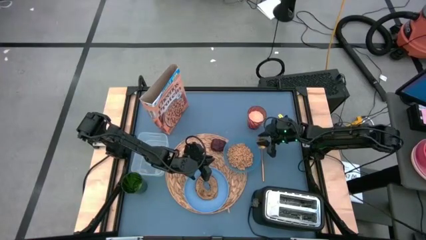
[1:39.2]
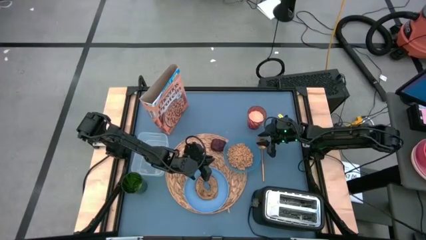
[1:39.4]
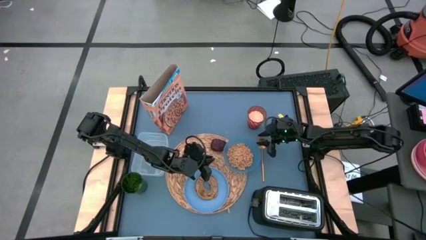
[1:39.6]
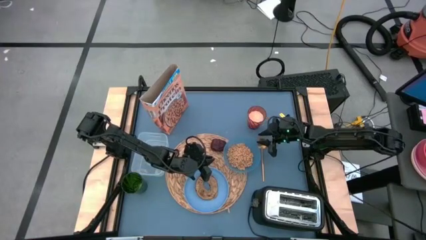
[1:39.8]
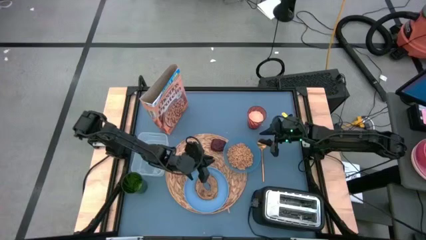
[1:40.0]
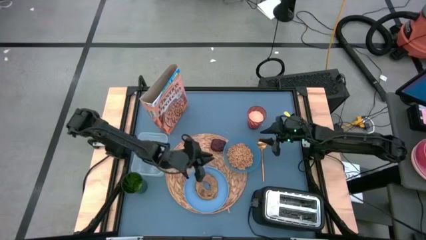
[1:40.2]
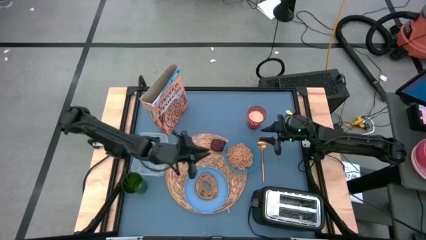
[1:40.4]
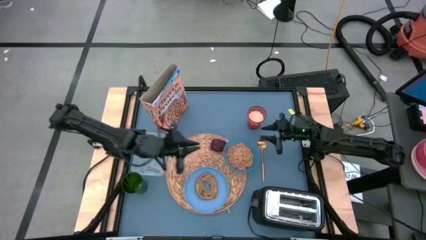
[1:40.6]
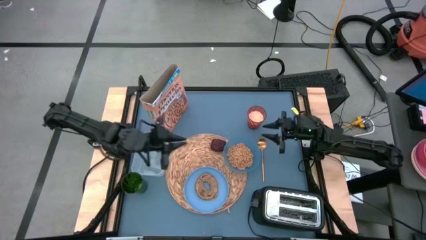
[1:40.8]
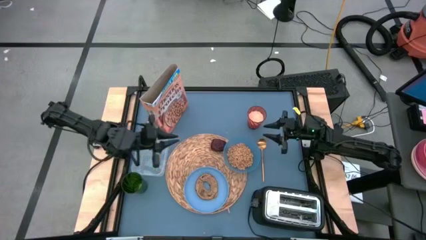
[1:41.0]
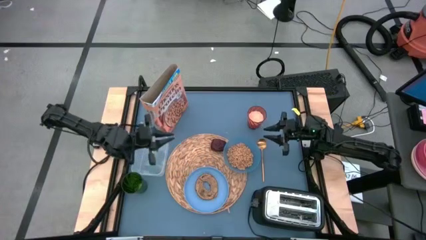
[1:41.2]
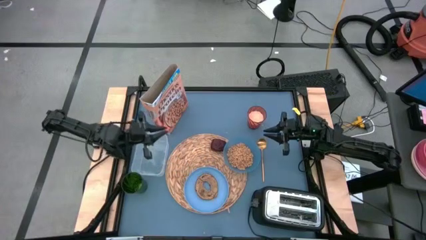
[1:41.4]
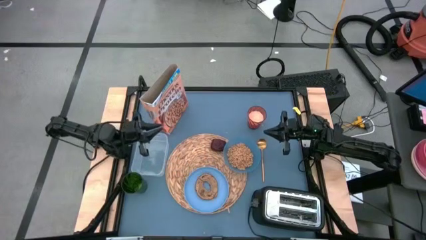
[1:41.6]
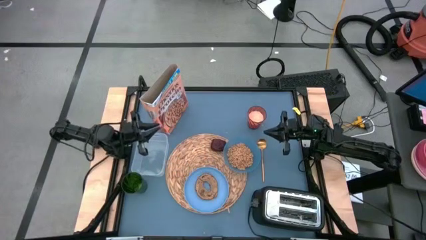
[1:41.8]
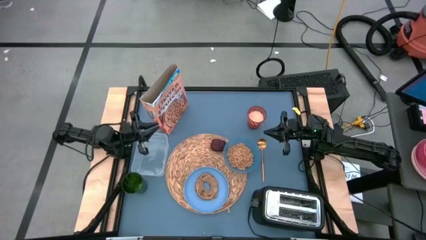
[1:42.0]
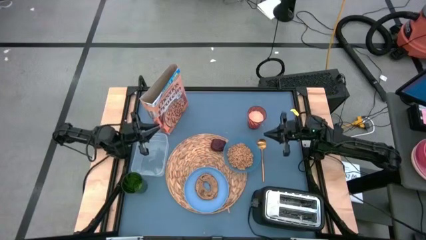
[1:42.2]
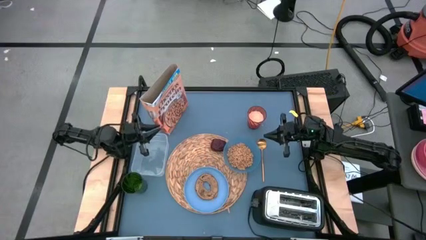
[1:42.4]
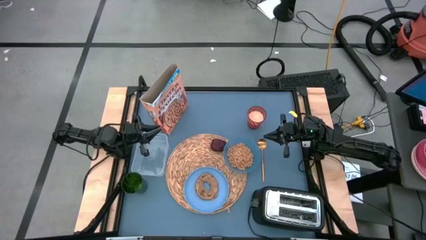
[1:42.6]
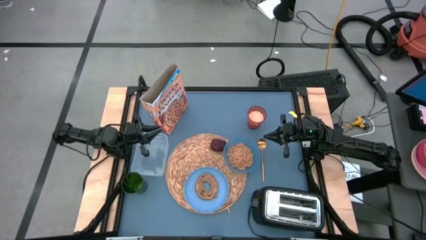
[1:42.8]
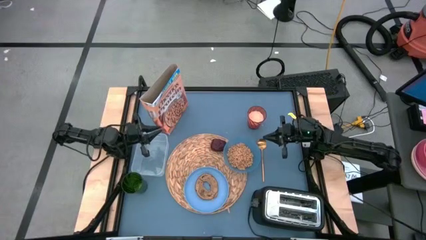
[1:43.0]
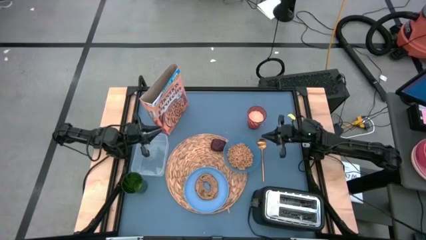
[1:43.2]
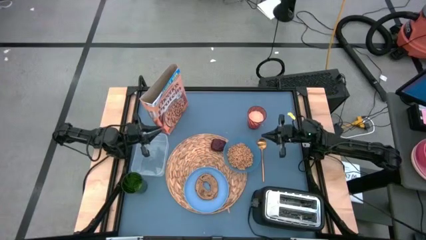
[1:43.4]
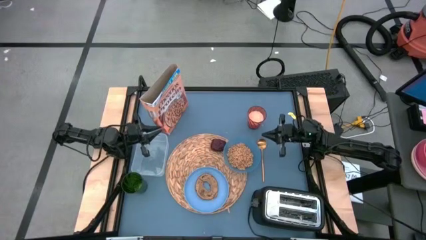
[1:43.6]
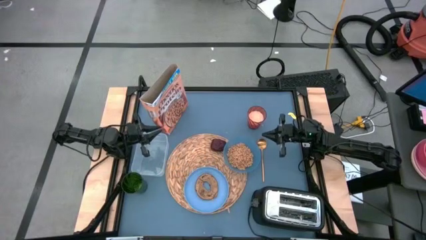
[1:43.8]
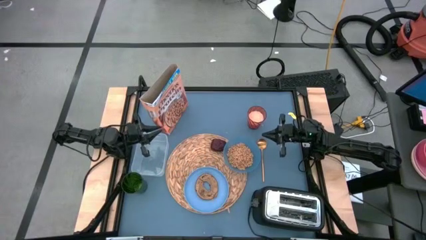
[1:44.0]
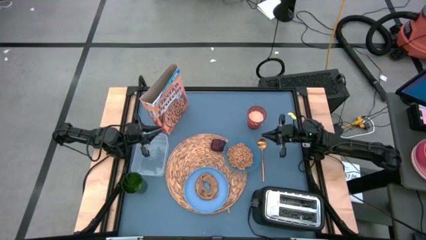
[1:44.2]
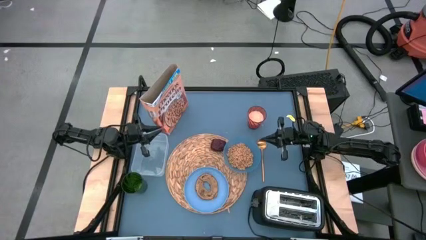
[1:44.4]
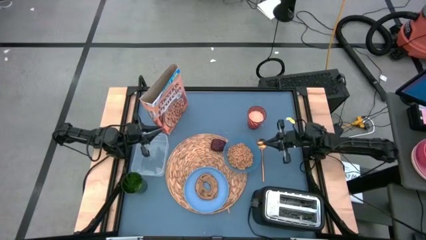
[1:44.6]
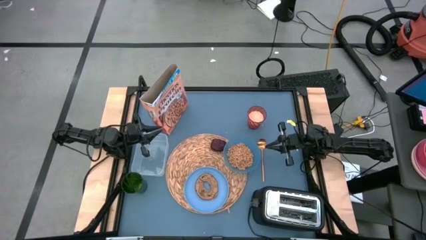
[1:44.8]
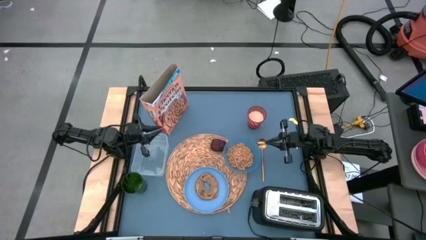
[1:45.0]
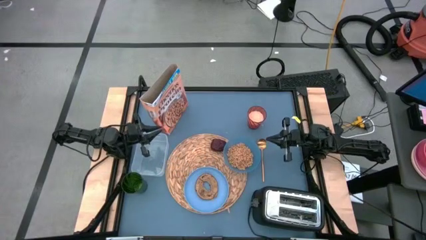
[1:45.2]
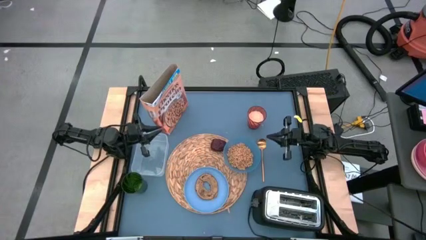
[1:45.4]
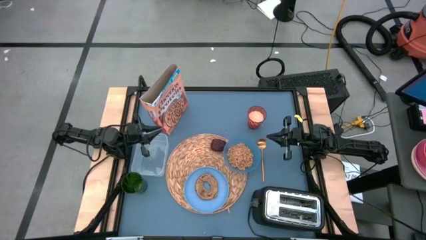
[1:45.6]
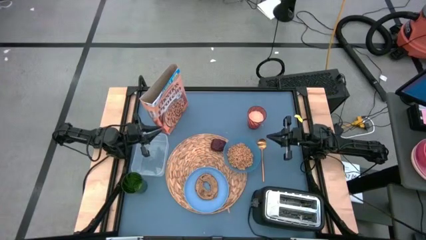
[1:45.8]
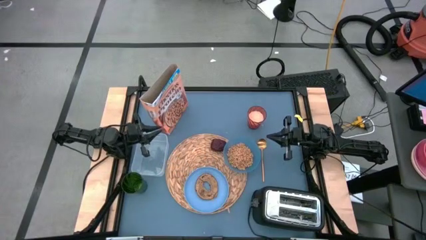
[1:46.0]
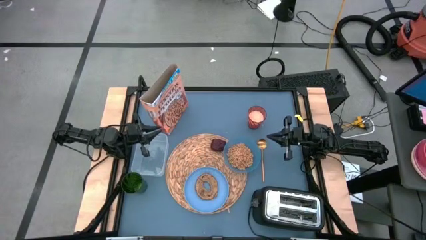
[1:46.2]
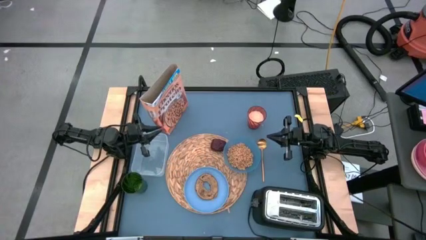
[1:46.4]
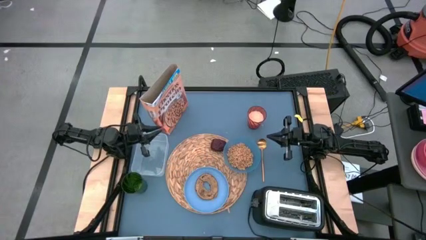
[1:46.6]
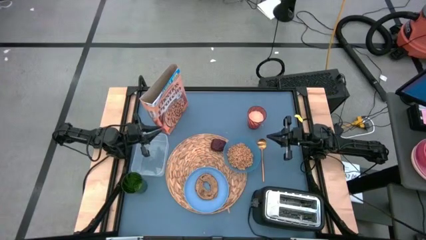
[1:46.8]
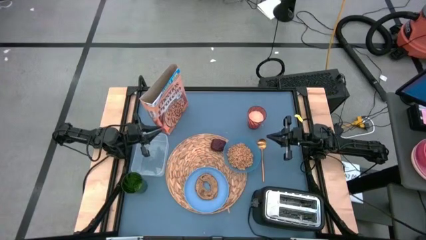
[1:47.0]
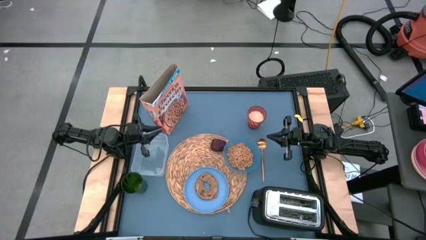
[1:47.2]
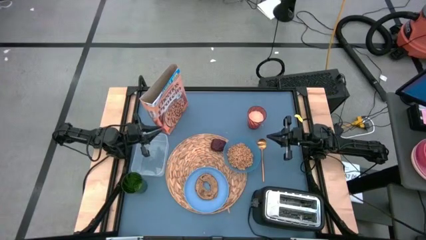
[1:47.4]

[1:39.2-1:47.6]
Task: Arrange a breakfast setting
Return to Home Position

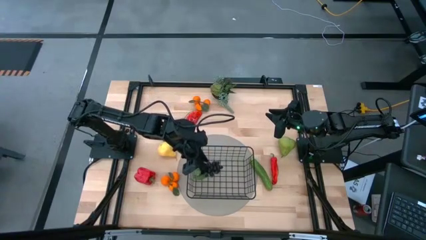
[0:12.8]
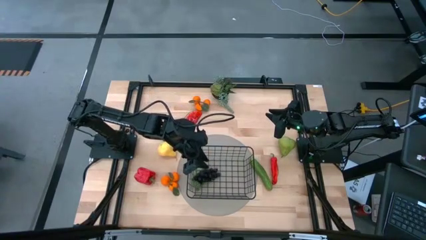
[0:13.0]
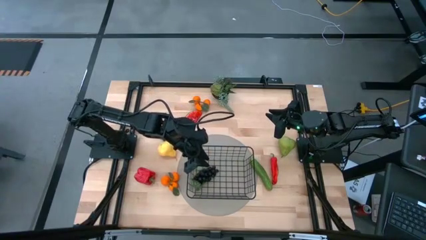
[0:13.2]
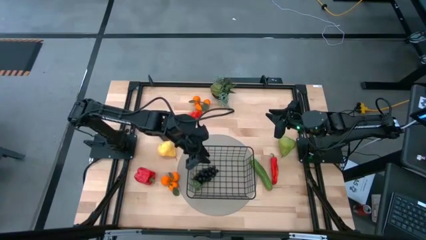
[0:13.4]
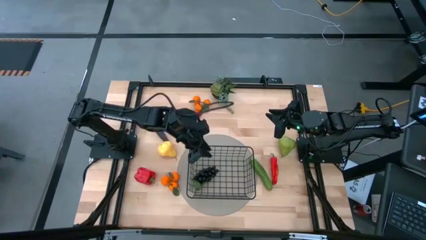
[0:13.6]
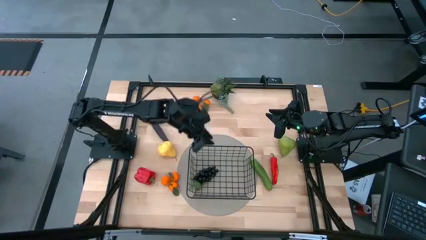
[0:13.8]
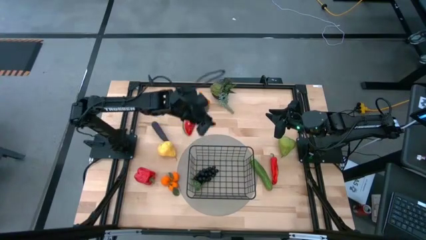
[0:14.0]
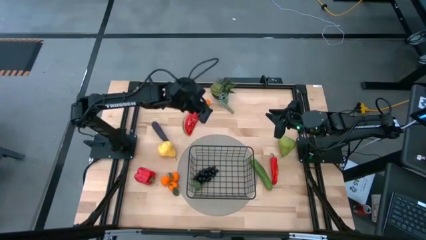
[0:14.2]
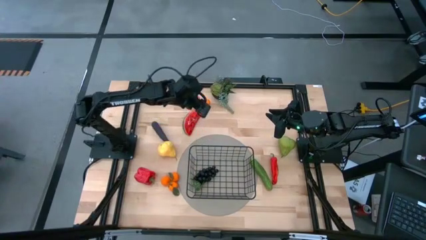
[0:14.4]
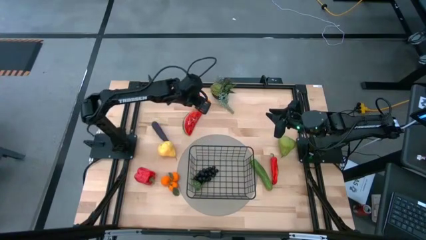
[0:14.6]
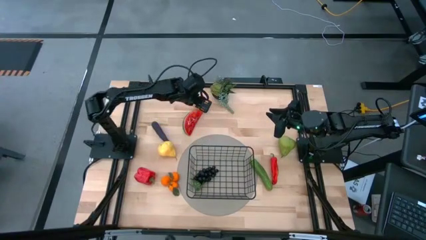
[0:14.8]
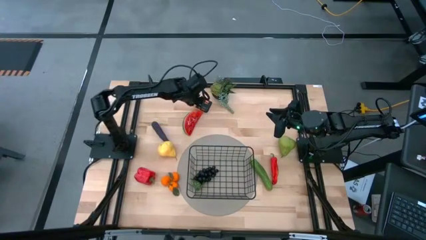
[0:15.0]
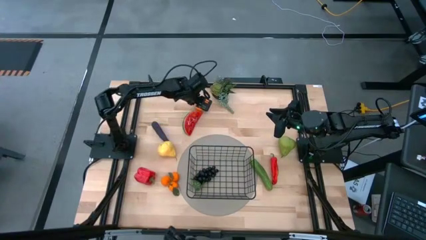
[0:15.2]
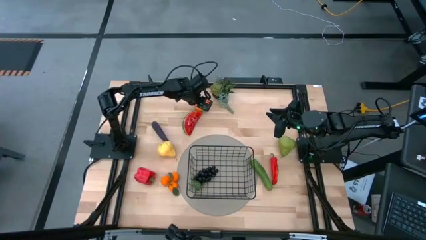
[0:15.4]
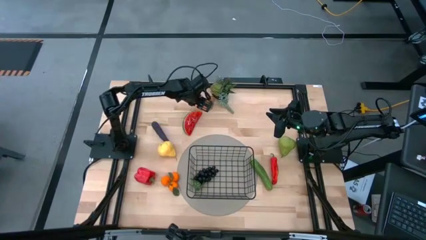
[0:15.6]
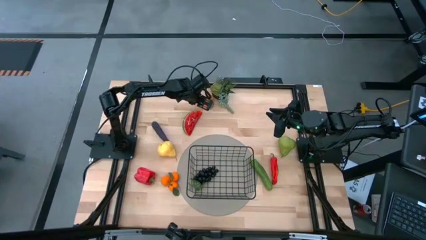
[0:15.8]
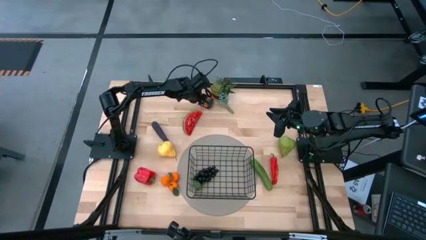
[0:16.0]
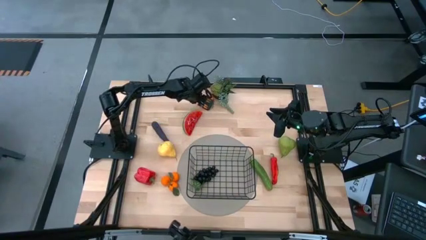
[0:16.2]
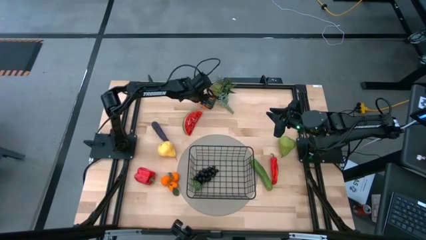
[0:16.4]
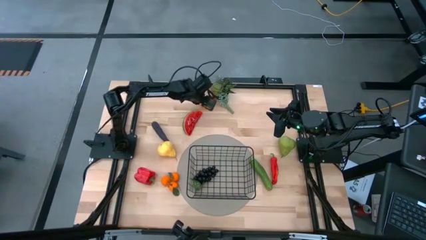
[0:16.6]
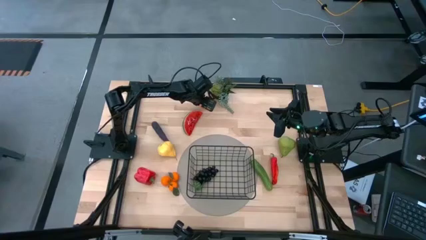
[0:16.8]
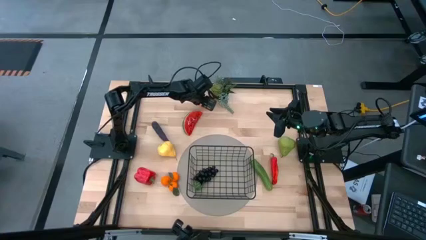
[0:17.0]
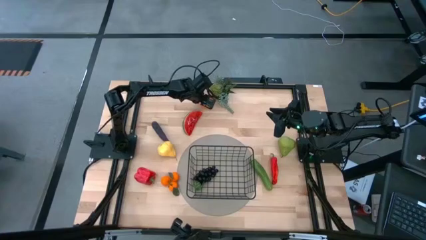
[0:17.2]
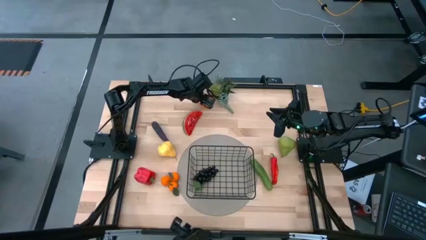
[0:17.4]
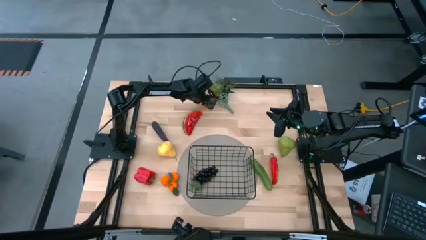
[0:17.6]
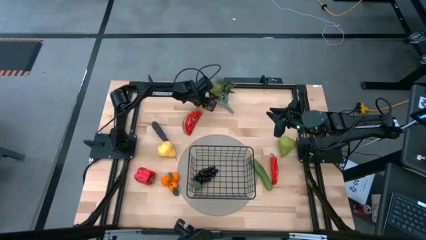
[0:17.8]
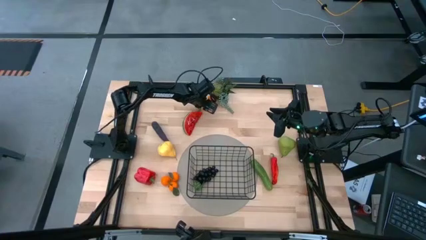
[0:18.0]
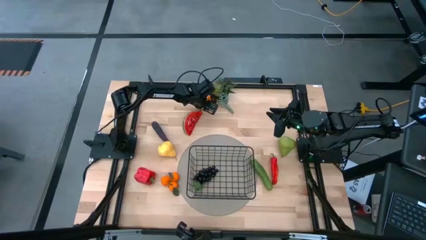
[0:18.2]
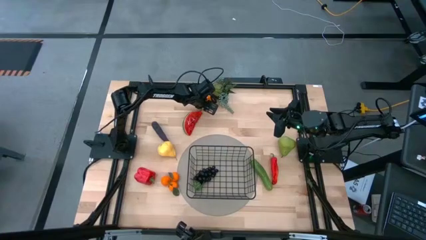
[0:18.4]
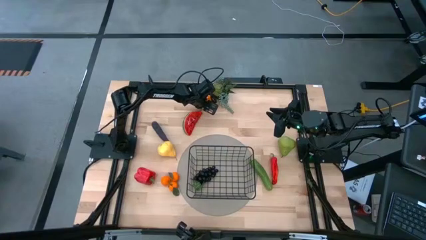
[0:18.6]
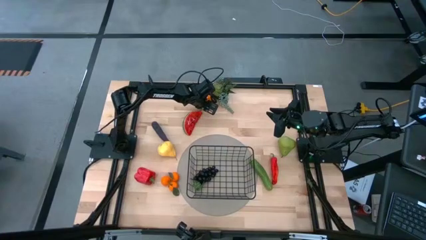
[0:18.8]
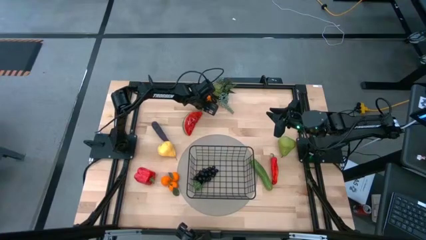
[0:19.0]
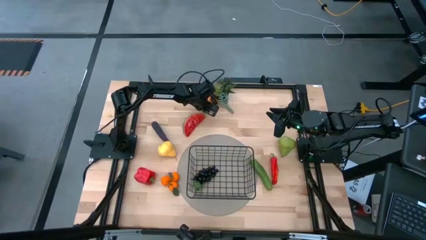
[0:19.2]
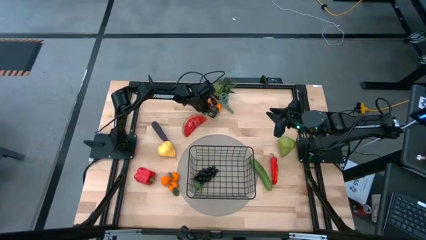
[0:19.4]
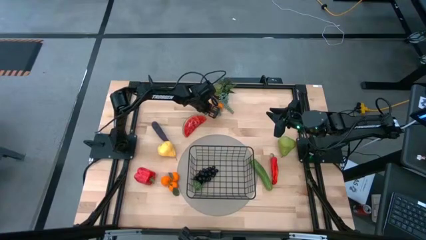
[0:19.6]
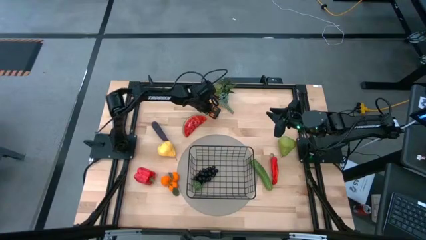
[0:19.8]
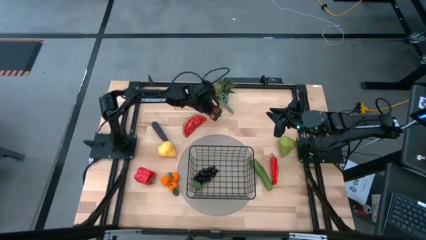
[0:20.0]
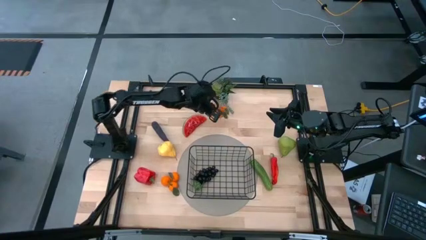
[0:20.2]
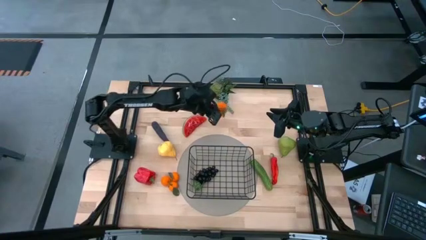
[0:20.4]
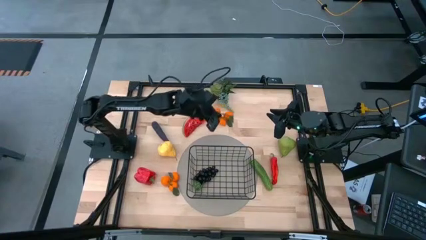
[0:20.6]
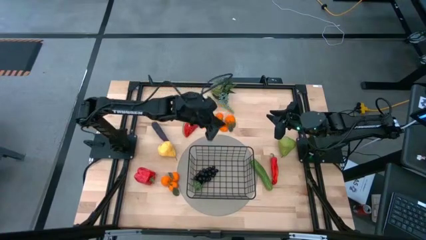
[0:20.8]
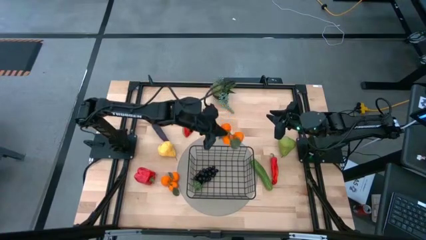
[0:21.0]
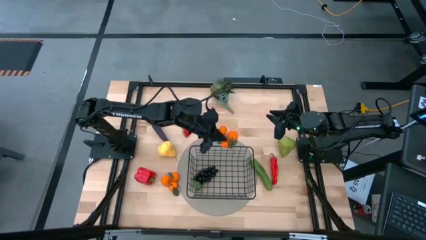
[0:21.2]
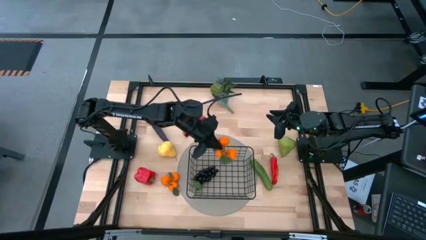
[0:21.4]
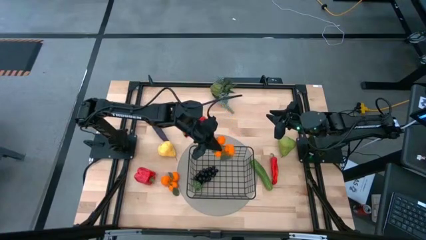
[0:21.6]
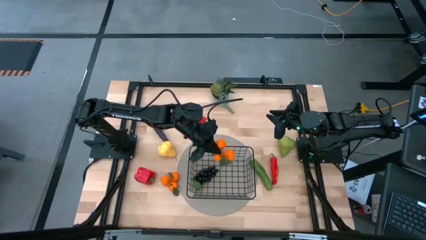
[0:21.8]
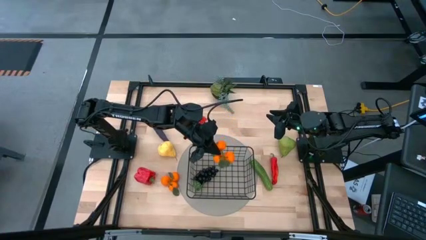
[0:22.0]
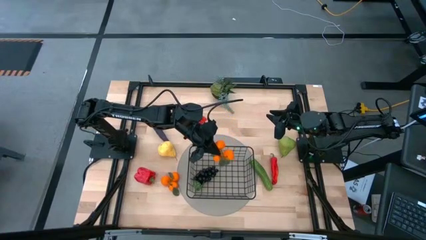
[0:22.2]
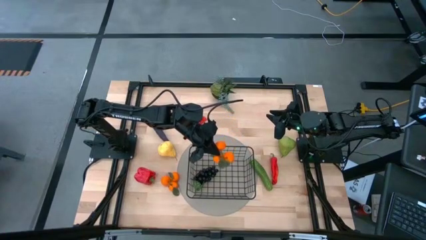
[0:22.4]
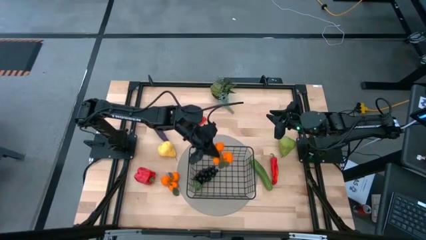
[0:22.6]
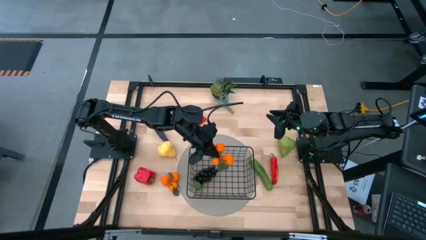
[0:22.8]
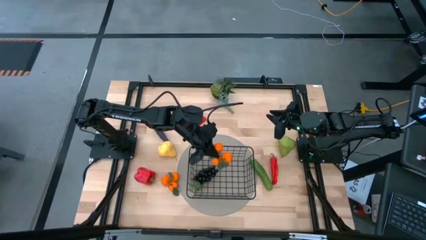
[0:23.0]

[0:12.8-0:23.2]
Task: Build produce basket
Put the orange tangerines into the black wire basket
